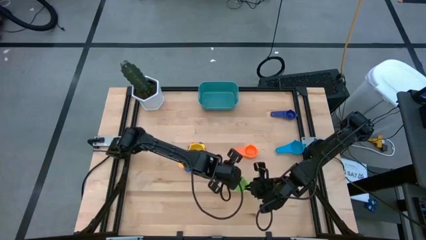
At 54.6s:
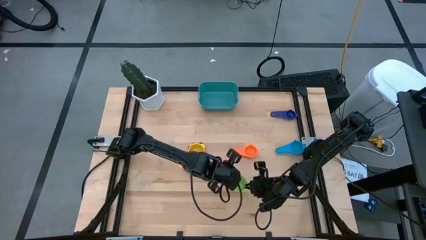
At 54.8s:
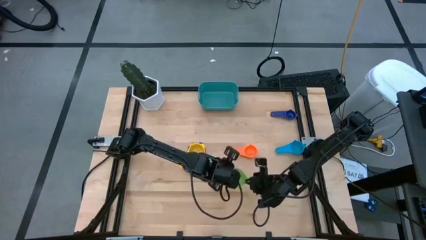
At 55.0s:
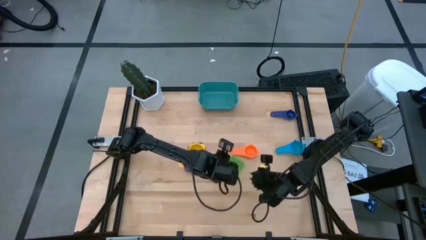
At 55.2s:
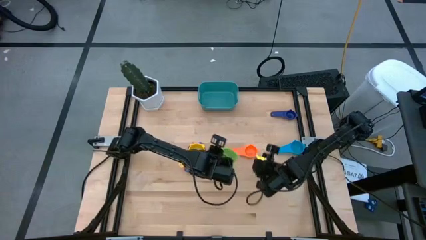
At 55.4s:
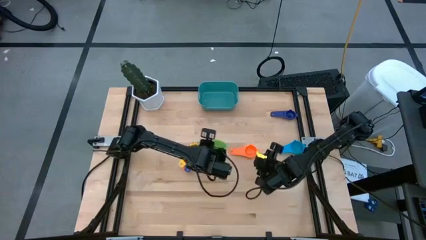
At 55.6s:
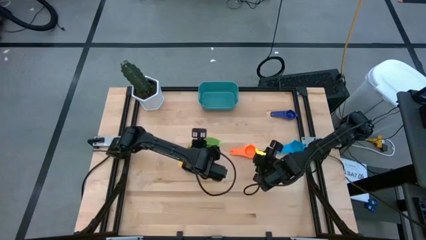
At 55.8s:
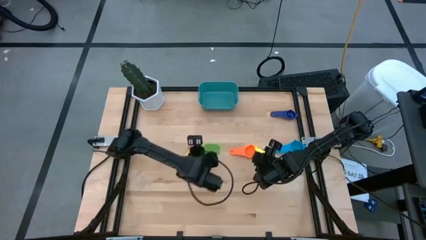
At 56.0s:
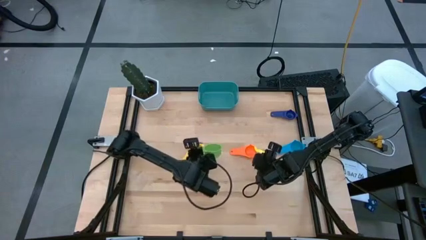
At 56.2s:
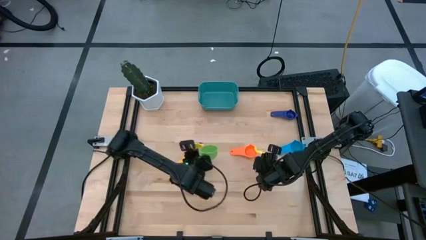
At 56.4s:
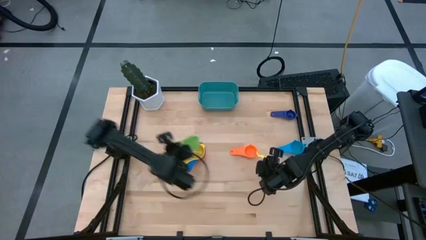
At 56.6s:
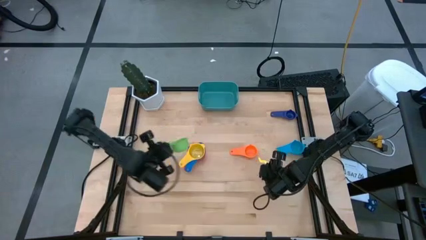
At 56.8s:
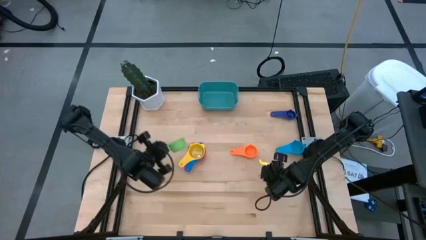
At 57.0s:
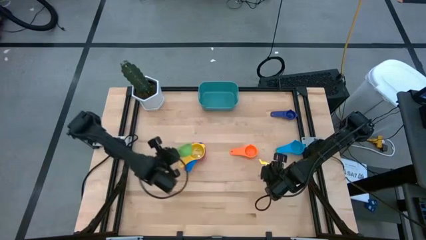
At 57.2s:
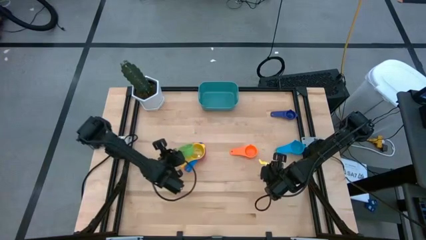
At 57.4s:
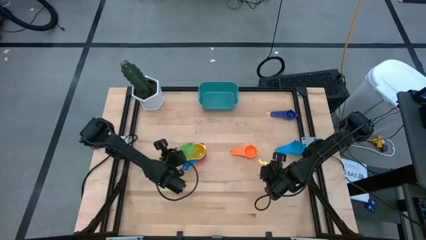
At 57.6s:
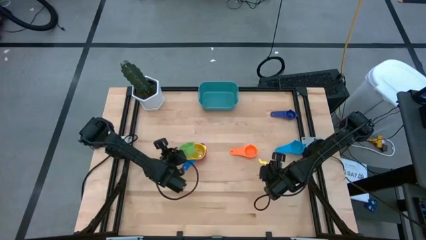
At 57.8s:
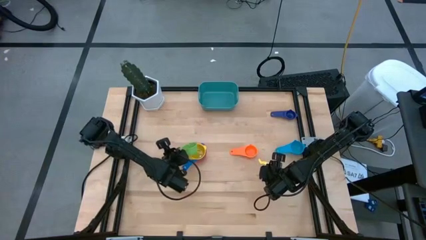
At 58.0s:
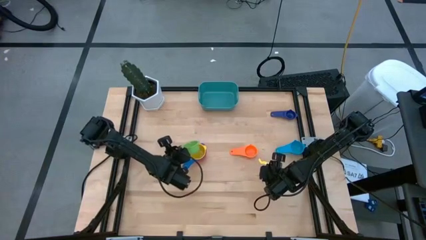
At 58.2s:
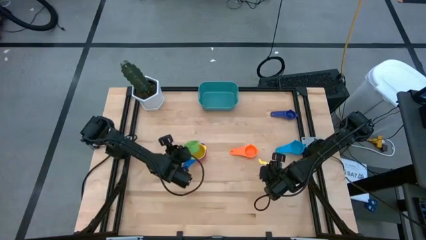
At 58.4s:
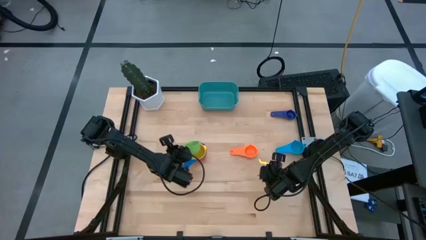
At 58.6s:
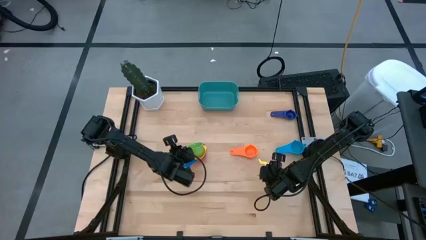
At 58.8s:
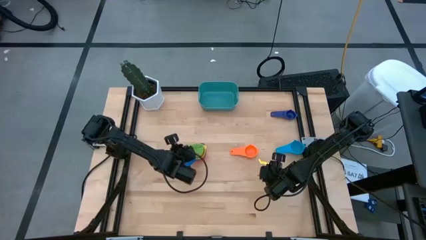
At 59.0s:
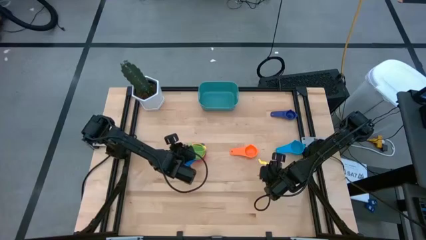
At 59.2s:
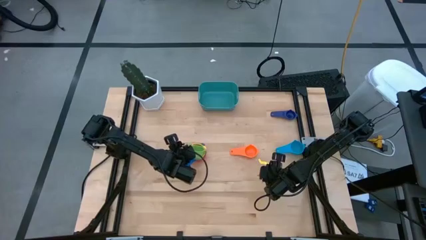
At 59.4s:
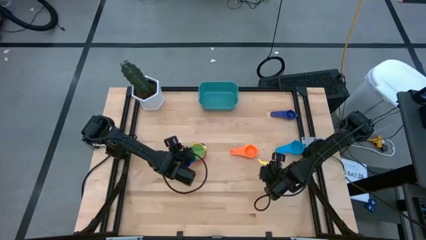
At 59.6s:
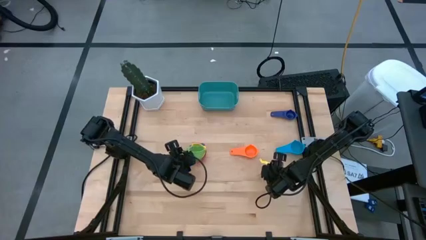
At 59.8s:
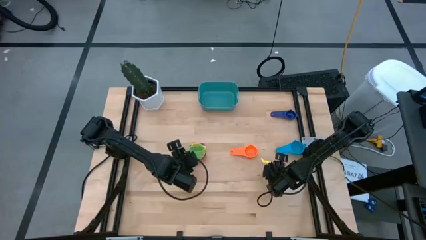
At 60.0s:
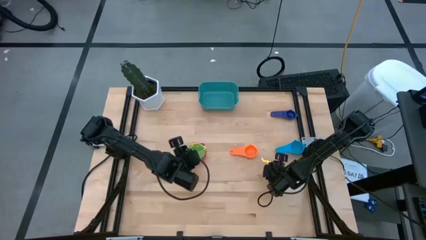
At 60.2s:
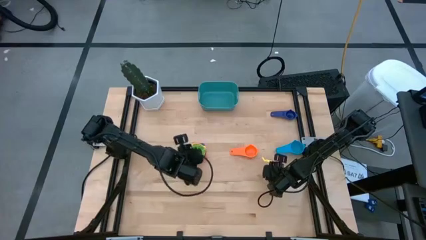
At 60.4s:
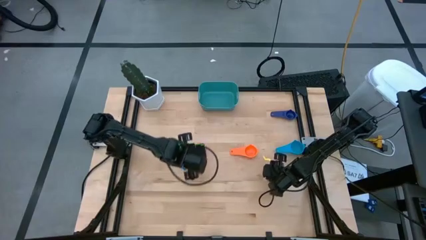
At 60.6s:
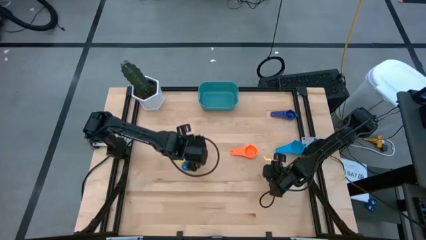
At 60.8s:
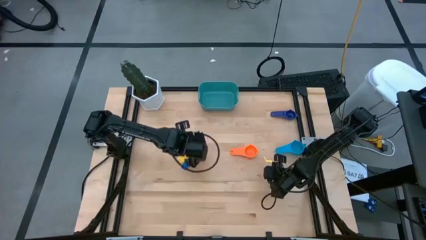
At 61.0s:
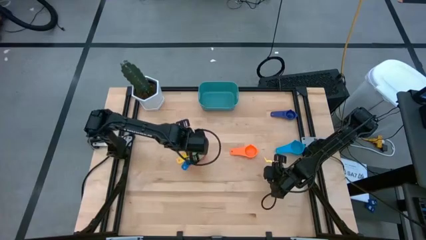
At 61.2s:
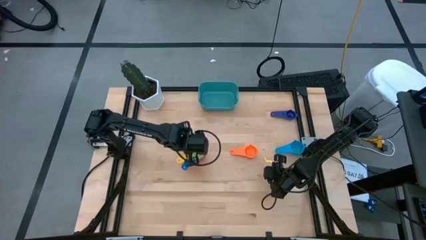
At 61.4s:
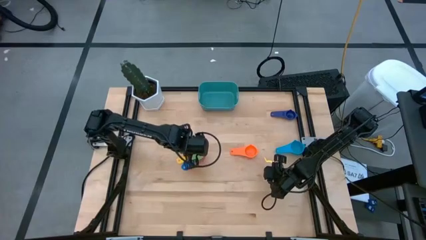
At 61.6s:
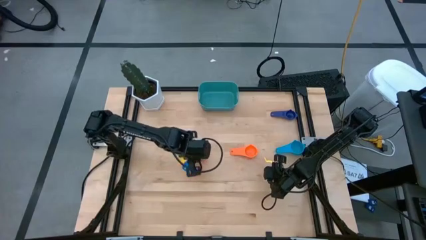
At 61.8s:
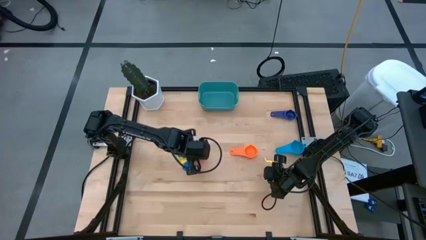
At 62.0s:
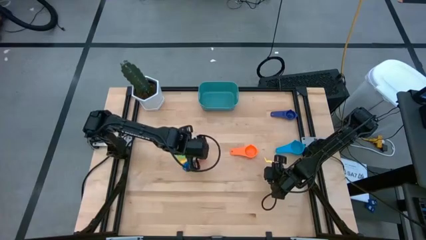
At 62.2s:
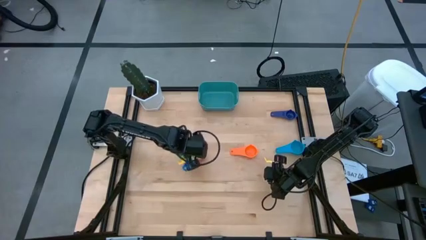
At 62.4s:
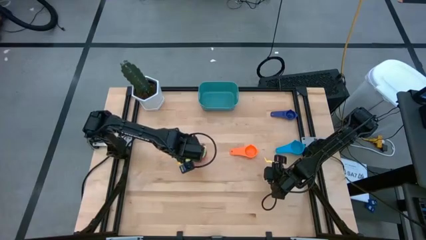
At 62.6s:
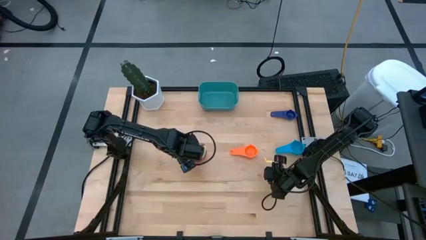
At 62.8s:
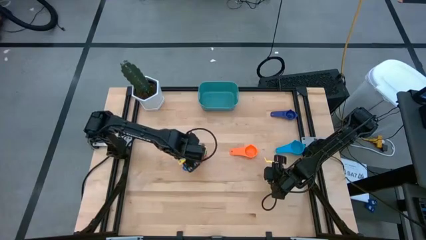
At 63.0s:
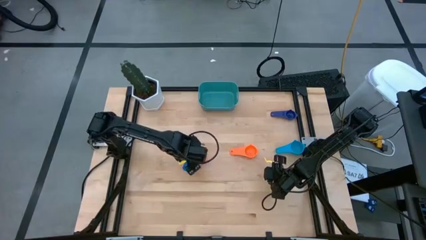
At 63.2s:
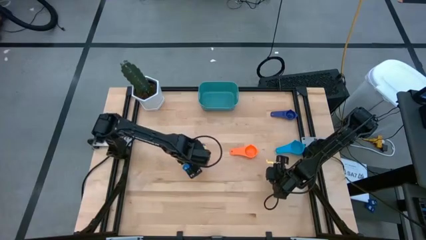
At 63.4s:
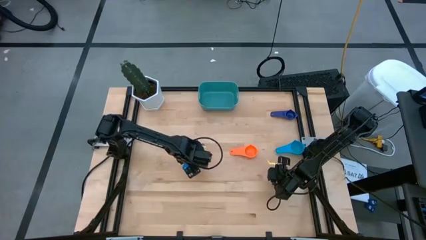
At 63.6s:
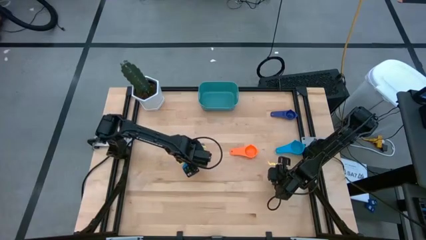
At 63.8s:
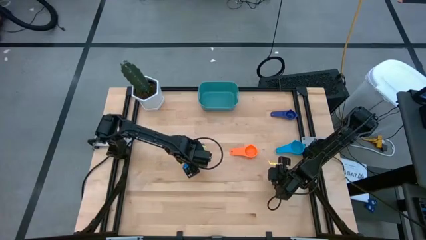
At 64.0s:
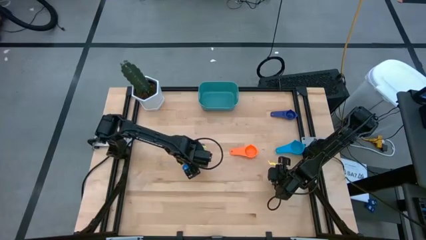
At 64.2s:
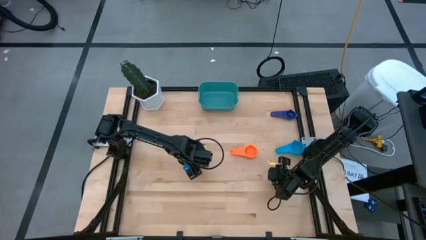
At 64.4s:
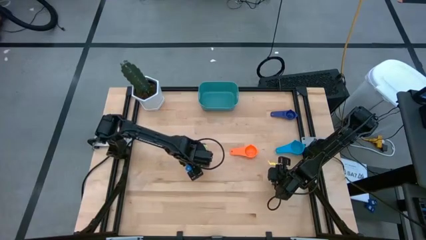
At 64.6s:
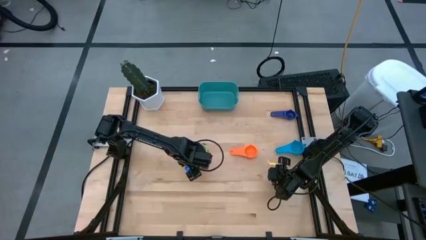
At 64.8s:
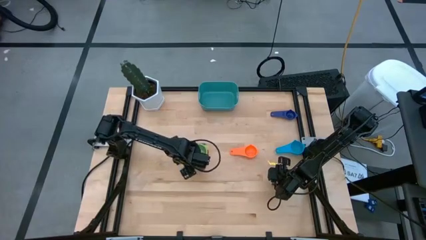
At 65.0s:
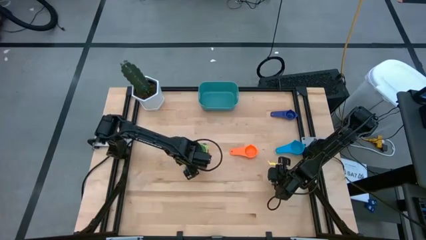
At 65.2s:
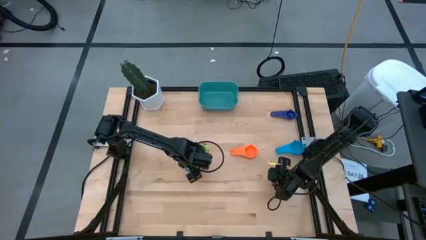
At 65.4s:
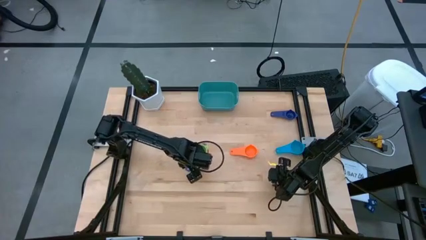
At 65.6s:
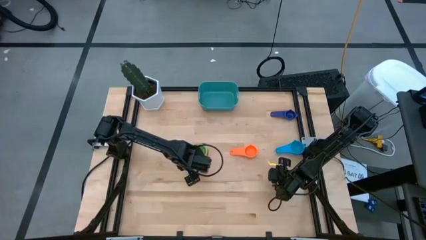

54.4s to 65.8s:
Task: Nest measuring cups in basket
Stack the green measuring cup on the yellow measuring cup

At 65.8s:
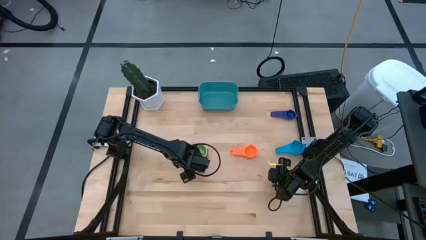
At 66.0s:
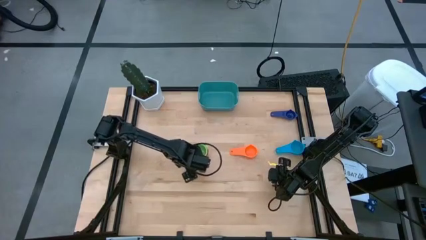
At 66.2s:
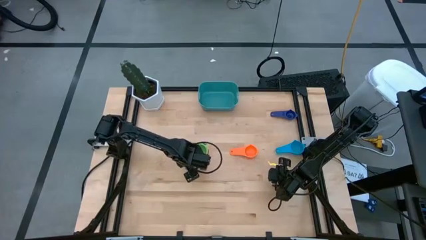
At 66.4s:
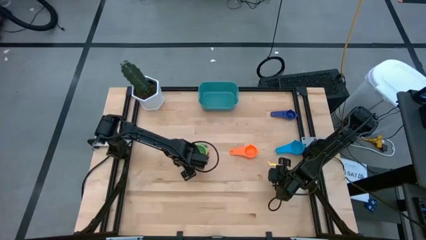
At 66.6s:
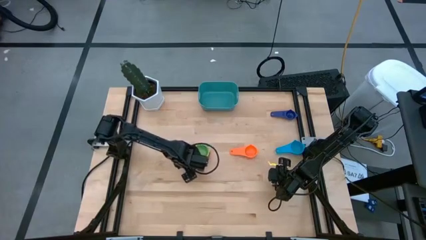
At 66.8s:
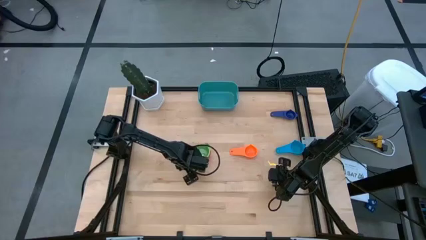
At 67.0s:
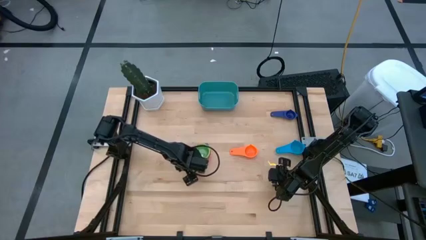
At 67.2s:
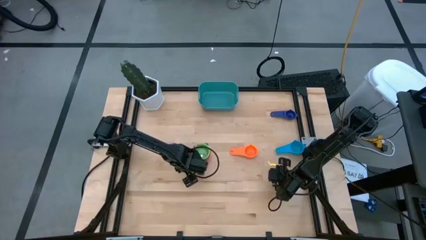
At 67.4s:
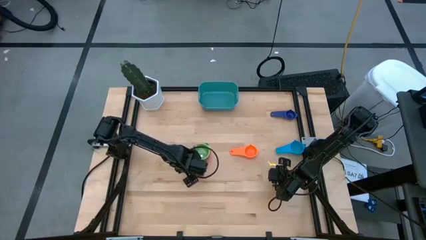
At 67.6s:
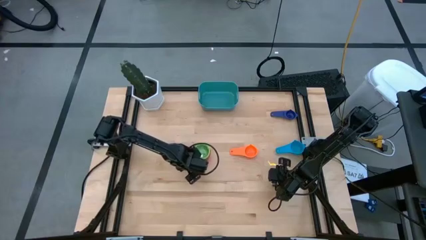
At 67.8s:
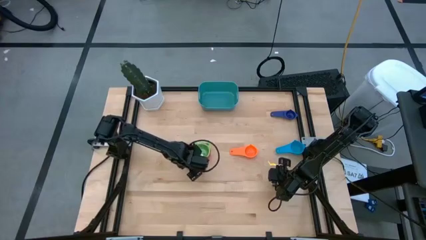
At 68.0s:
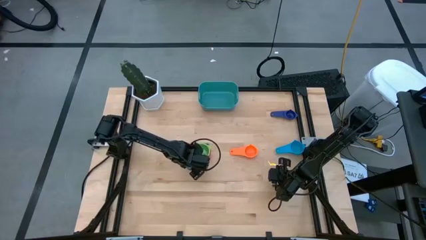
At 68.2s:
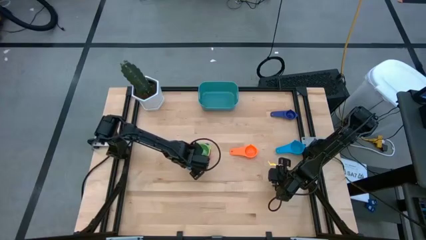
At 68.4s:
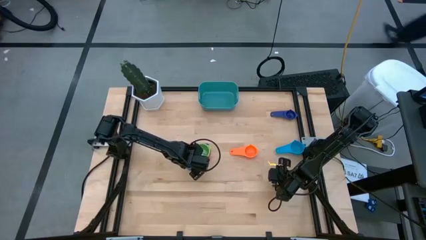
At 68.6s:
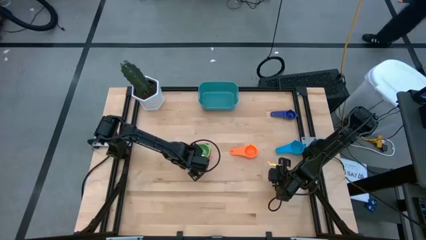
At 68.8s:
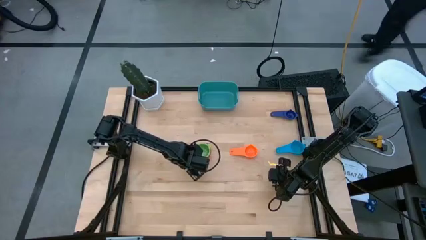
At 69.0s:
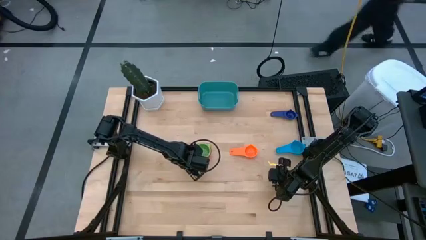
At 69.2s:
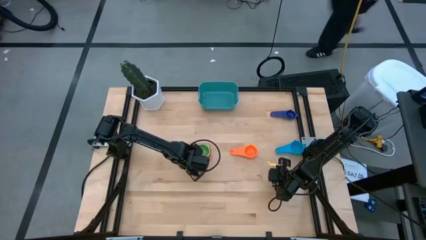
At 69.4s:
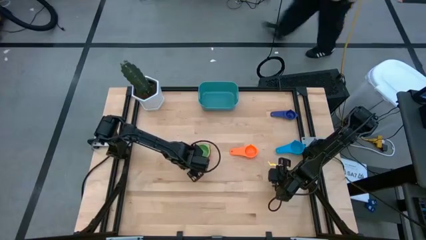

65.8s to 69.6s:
Adjust the stacked measuring cups

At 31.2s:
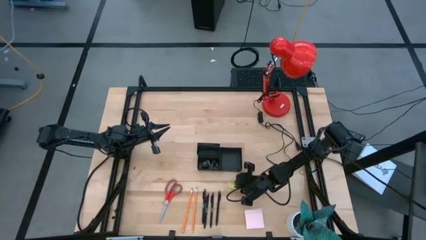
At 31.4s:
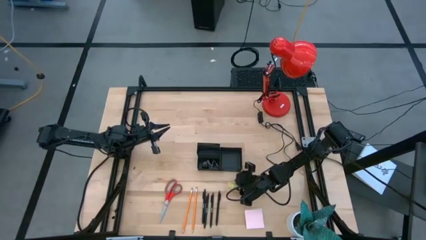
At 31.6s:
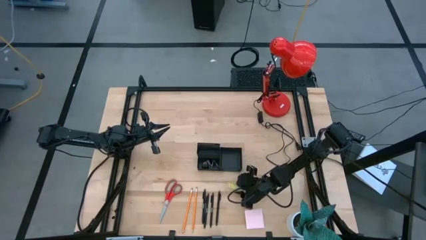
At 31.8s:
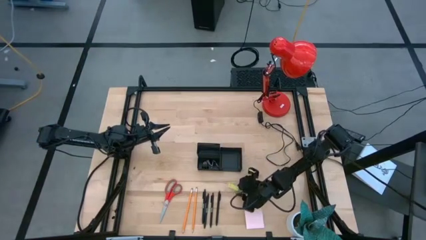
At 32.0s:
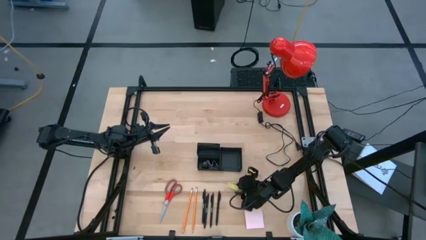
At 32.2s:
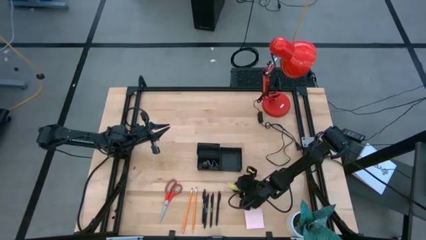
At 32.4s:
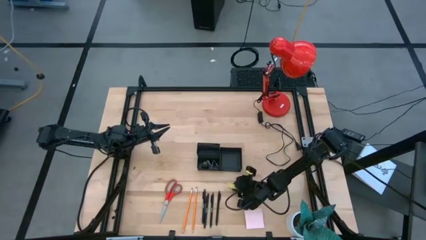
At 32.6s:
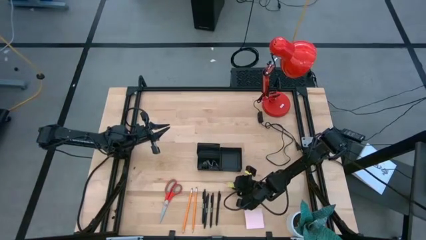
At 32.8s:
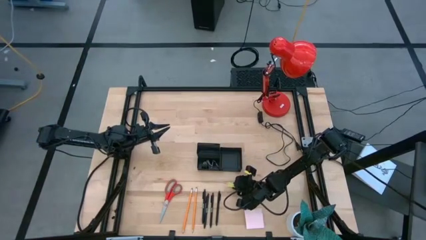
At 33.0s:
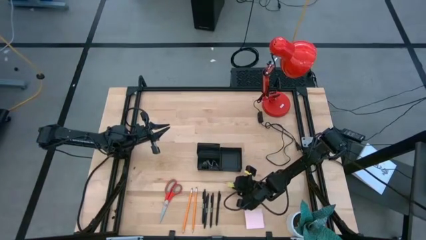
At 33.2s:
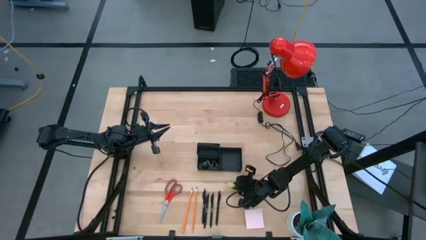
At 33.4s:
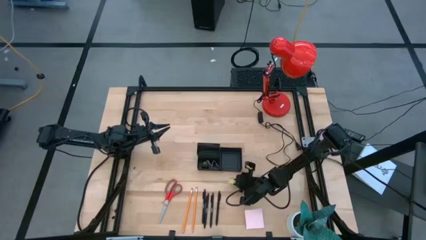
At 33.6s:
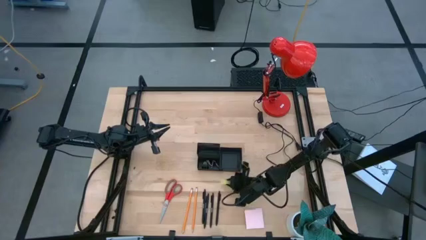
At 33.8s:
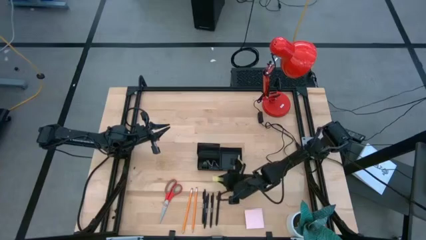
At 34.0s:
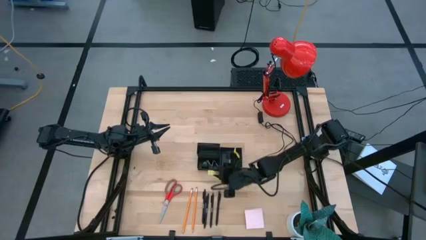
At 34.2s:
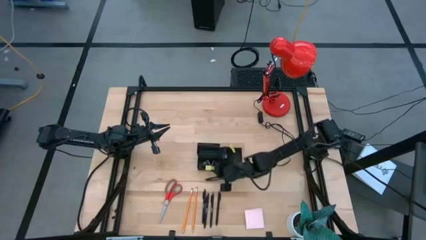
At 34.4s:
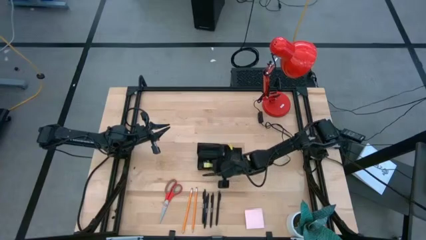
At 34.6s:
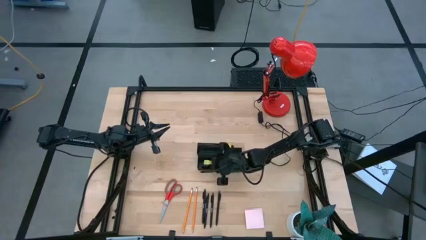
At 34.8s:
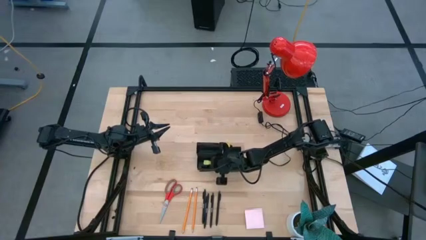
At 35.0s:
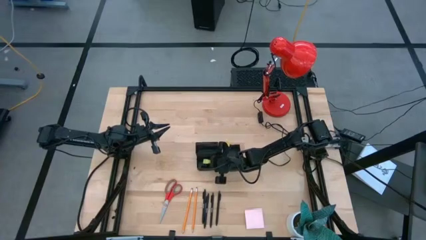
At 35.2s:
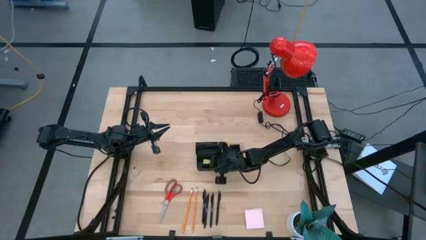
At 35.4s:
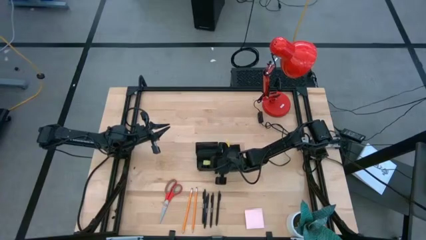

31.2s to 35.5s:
Task: Pick and place office supplies into organizer
Put the green eraser into the black desk organizer
